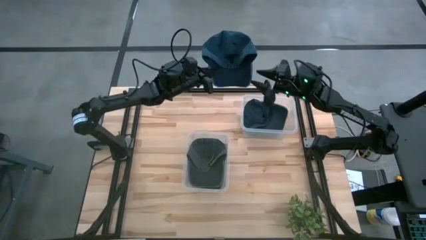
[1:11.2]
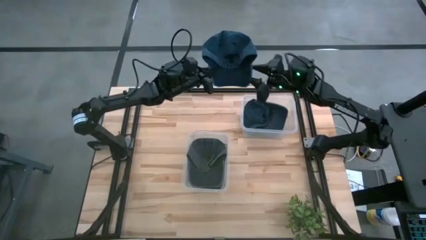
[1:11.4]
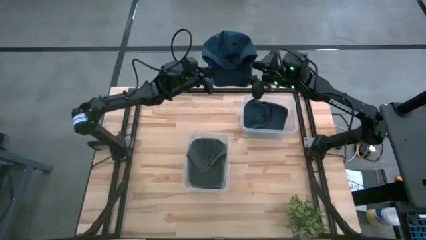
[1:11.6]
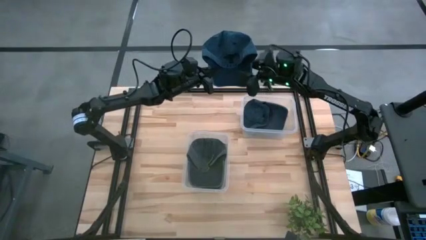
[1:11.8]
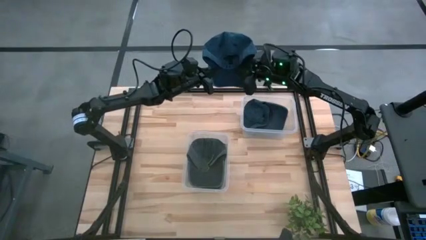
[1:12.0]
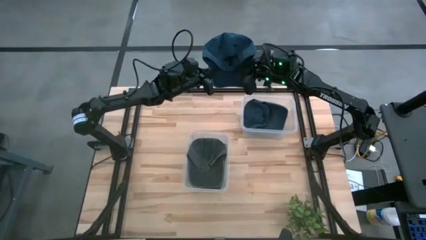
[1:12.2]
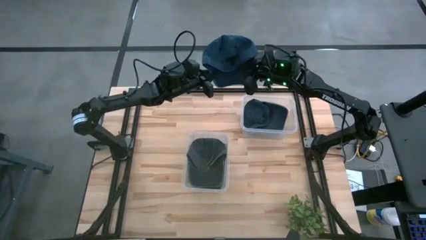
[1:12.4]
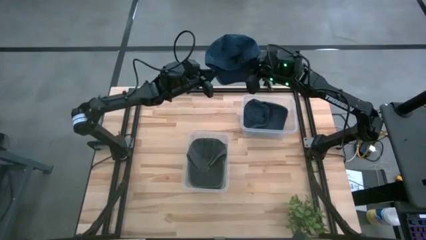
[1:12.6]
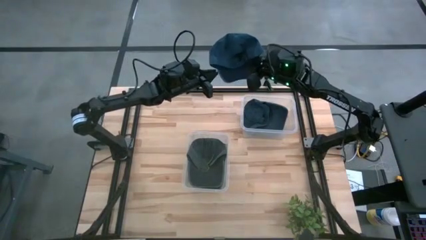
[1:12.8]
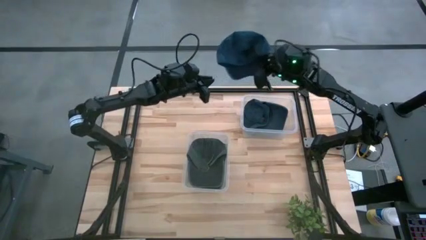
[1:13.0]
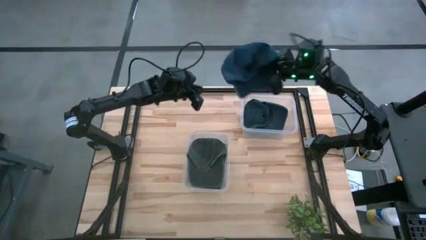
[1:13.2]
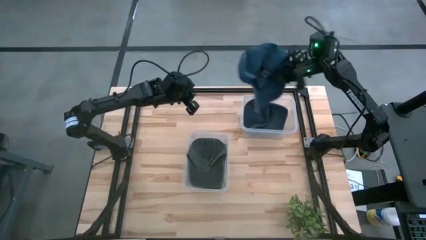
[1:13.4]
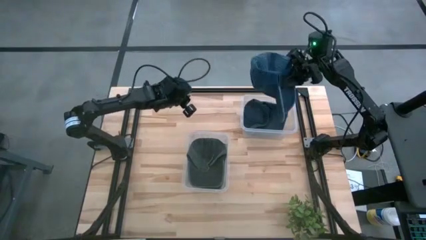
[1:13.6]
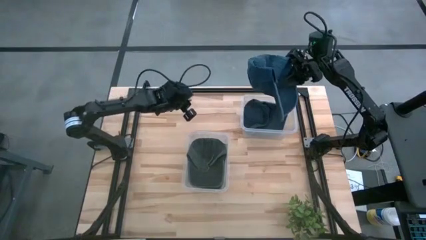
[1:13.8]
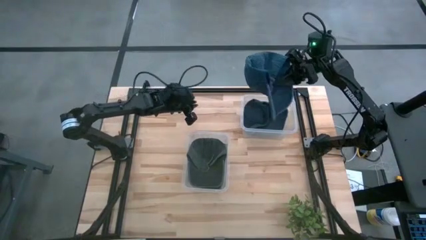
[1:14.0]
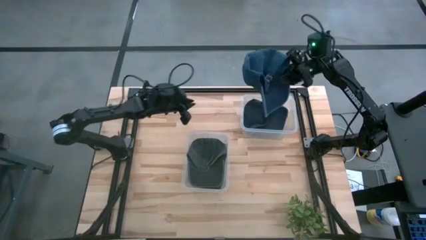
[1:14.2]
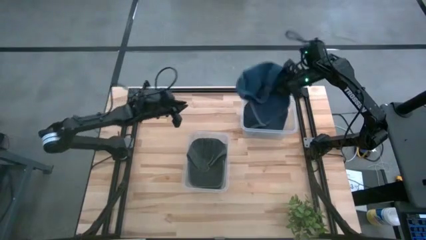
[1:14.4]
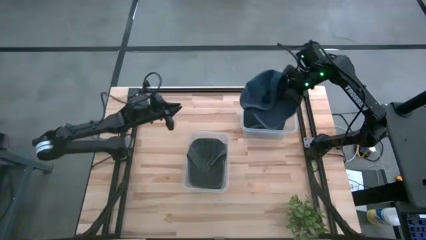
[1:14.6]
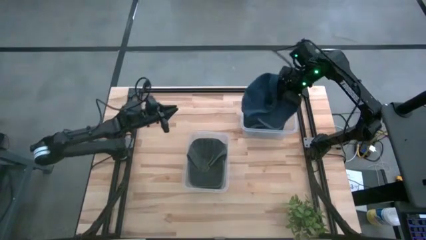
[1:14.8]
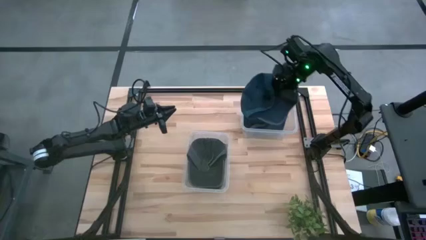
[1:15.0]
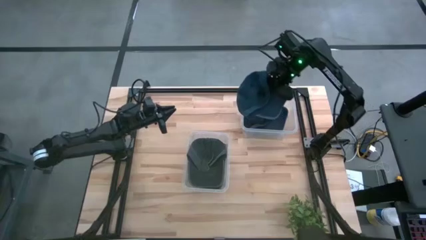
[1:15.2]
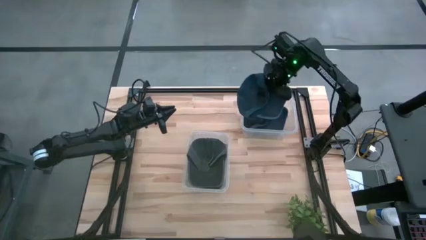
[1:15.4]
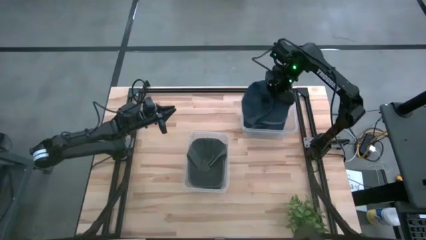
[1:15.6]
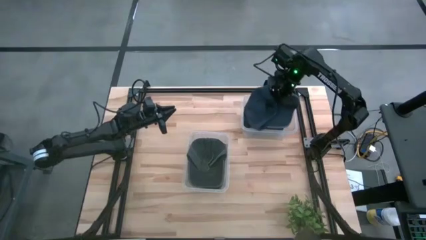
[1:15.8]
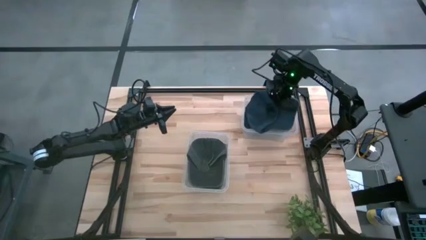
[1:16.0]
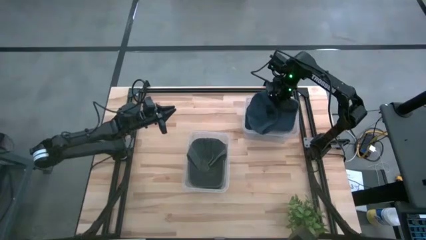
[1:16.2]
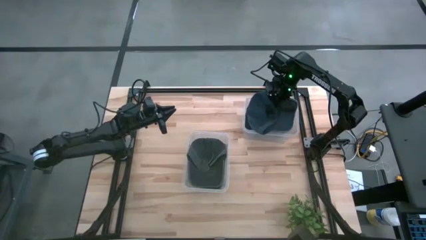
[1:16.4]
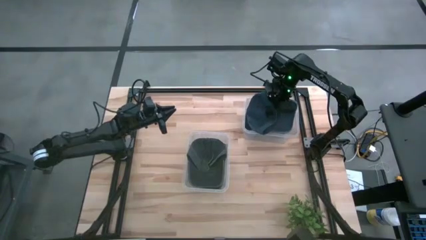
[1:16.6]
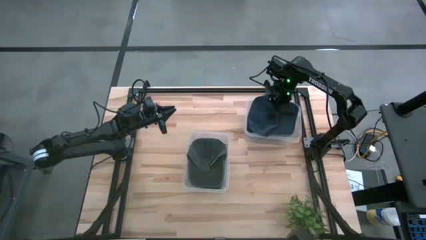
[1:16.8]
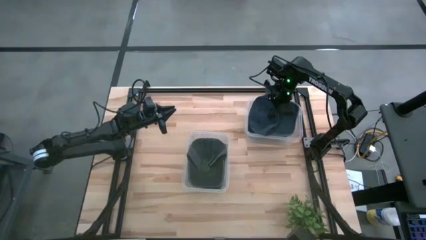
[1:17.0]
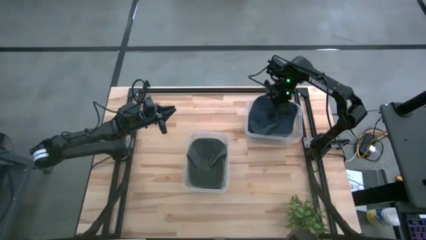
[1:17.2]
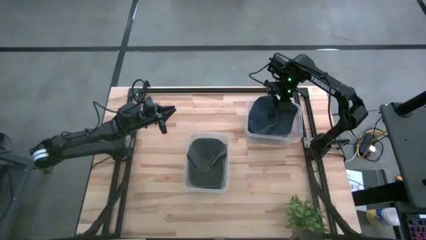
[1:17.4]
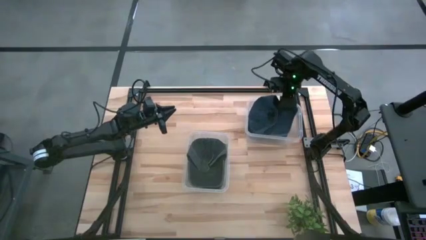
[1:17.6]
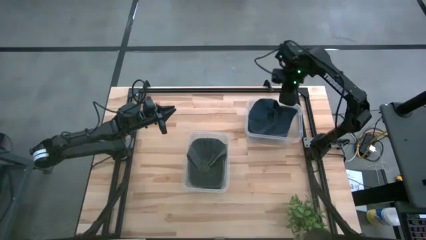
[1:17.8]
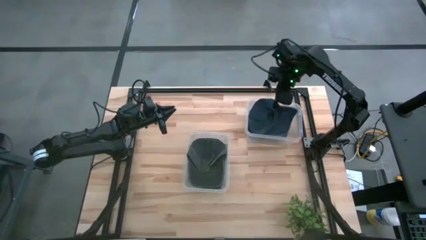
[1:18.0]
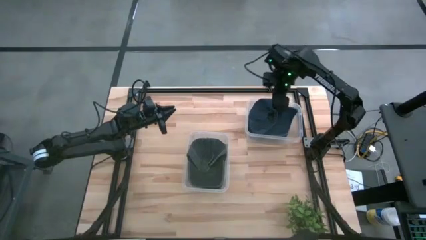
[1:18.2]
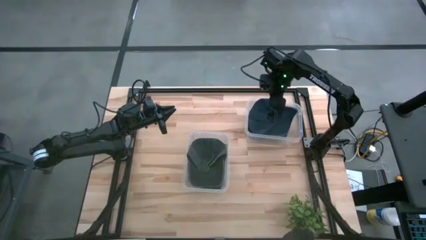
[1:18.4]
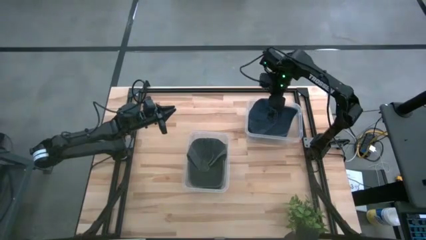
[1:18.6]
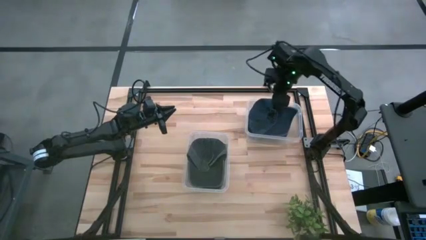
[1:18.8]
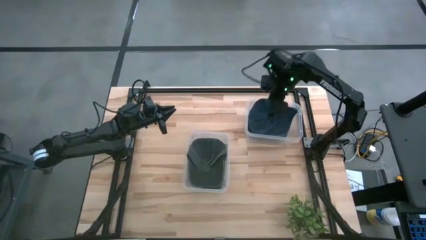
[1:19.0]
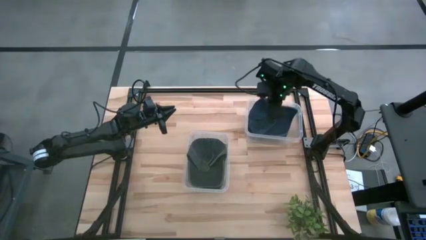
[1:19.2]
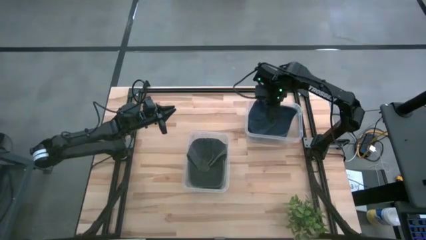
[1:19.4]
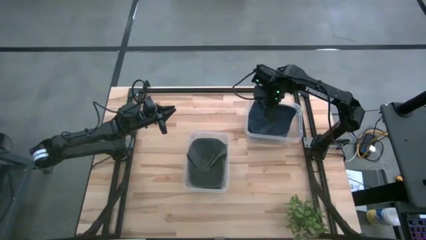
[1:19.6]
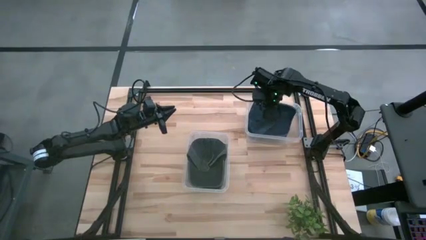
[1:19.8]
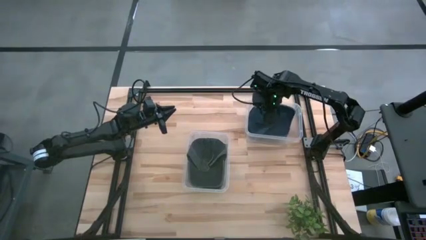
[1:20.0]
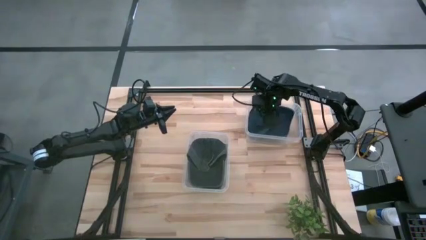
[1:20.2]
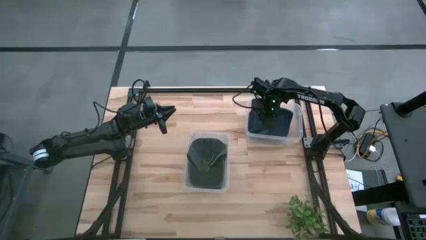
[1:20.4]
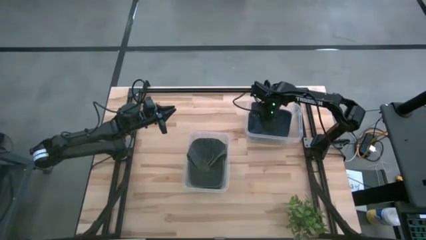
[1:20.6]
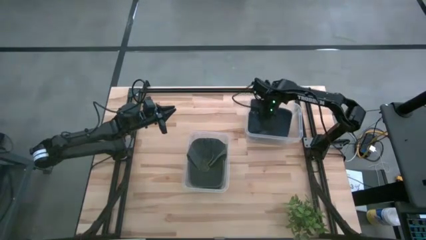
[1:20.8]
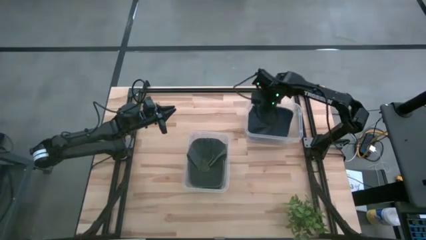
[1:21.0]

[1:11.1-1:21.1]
Task: Pick & Place hat
Put the blue cap into the top transparent bin

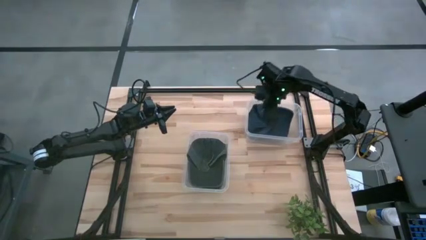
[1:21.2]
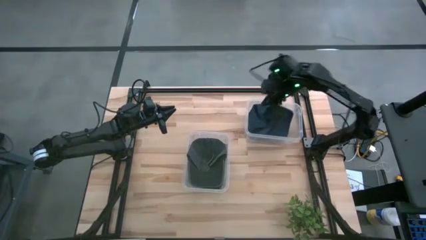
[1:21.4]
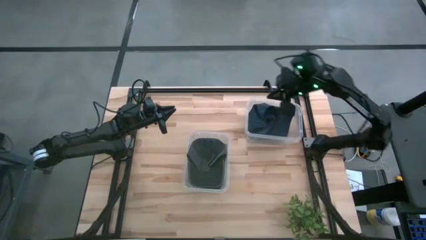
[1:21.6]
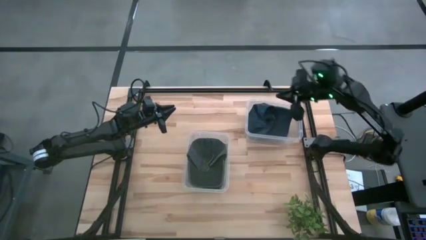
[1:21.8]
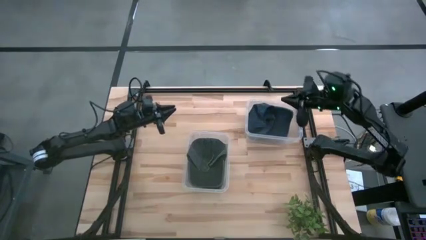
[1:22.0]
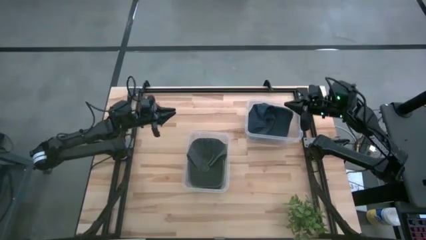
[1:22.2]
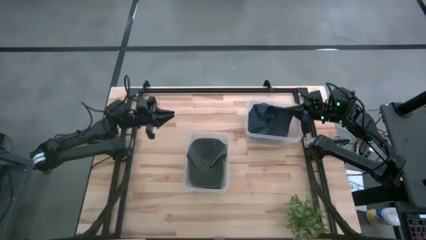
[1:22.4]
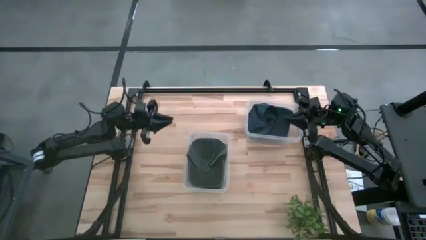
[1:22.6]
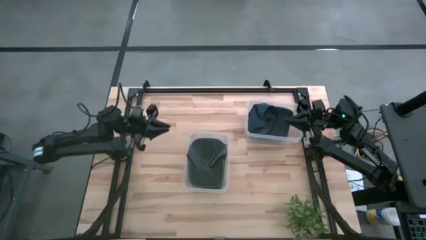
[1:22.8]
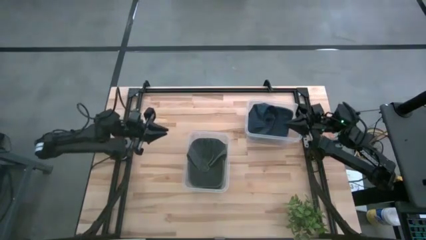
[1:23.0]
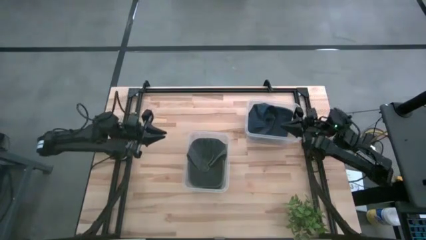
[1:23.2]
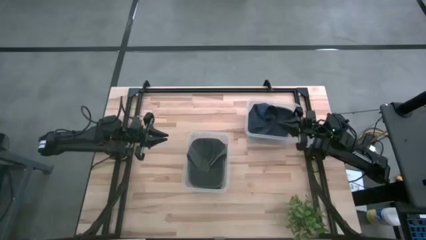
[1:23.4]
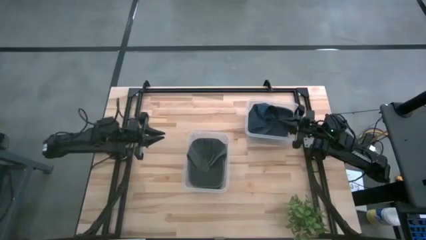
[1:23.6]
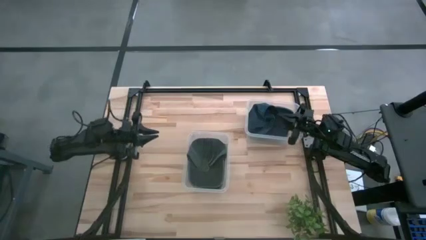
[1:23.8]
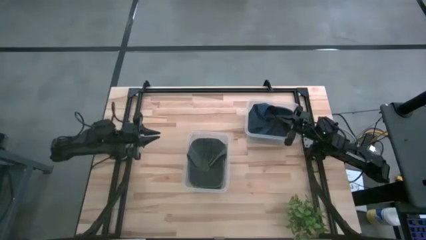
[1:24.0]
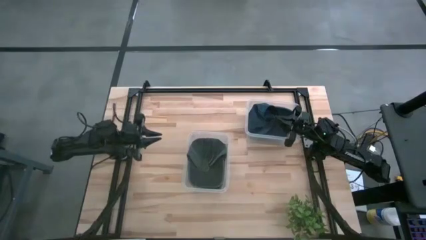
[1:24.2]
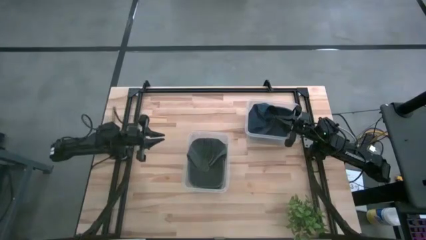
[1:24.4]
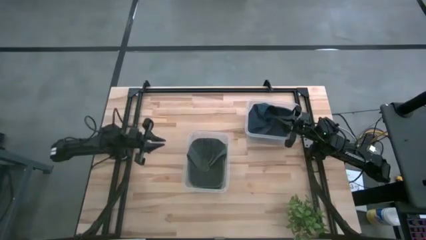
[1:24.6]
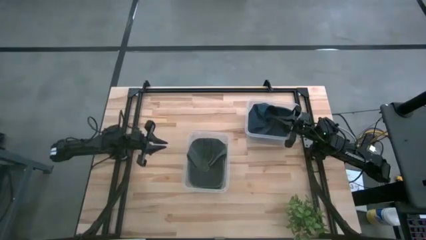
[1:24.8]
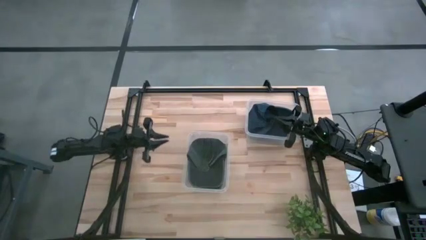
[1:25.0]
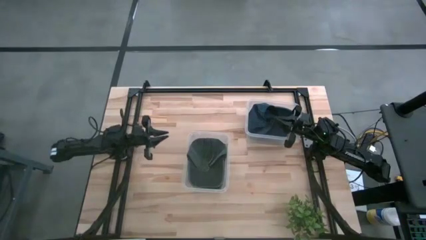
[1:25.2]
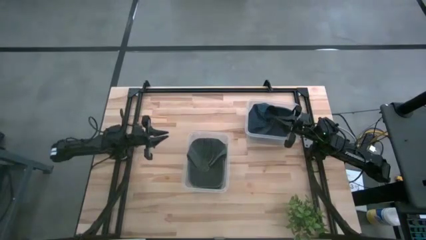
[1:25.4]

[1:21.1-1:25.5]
Return to Home Position

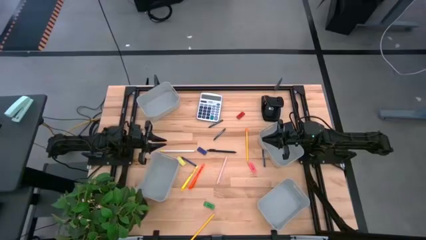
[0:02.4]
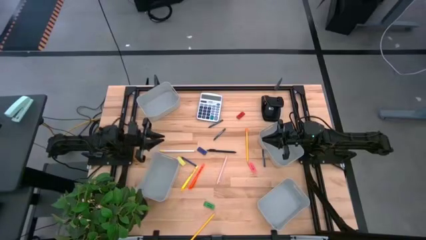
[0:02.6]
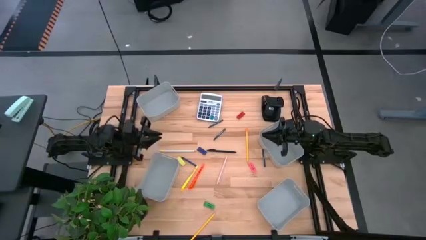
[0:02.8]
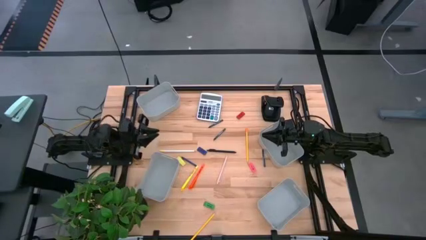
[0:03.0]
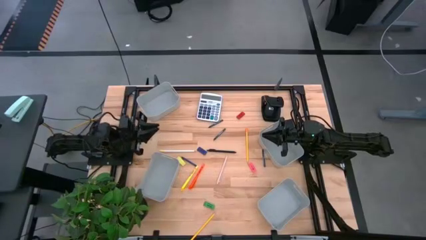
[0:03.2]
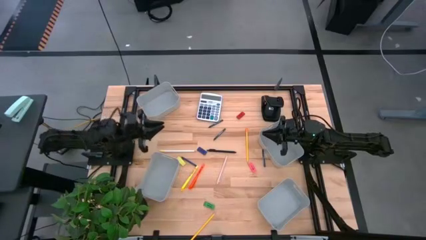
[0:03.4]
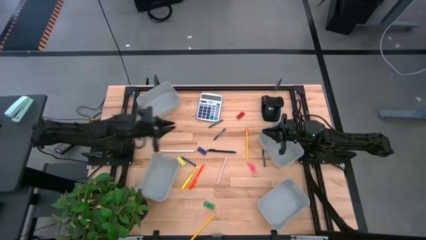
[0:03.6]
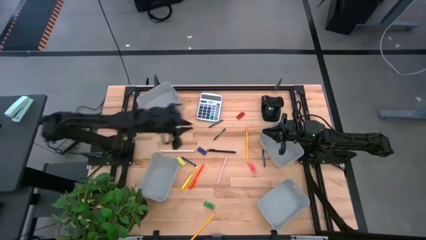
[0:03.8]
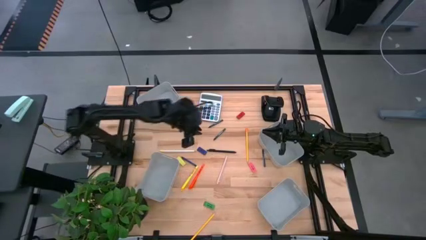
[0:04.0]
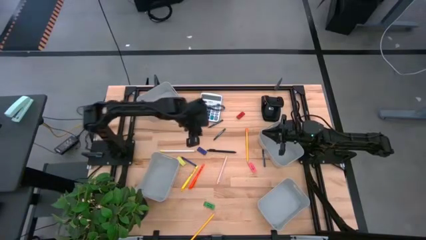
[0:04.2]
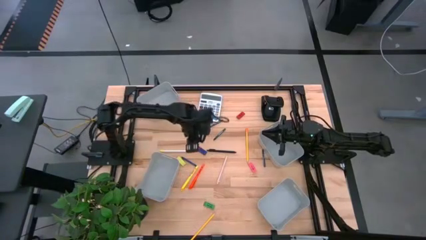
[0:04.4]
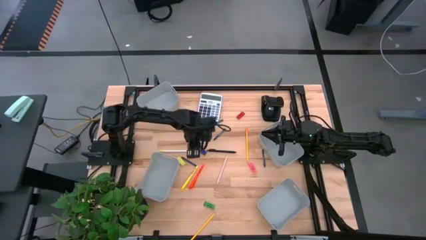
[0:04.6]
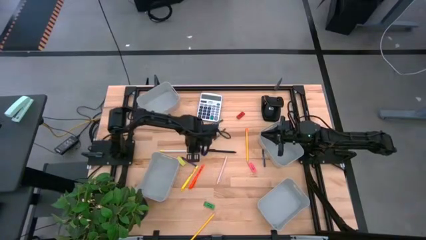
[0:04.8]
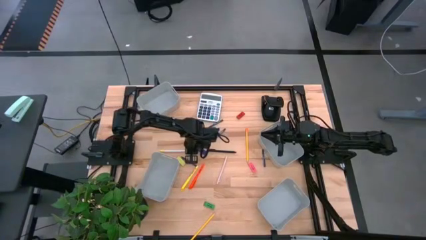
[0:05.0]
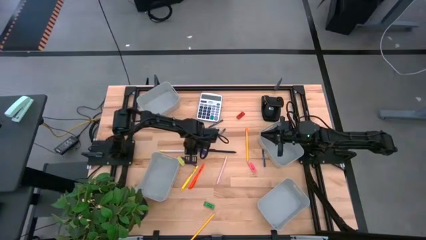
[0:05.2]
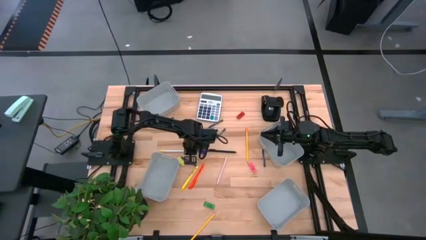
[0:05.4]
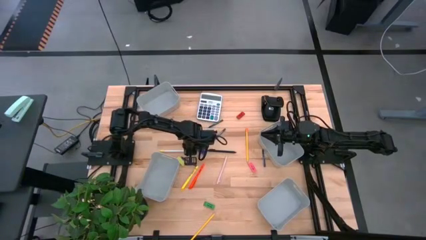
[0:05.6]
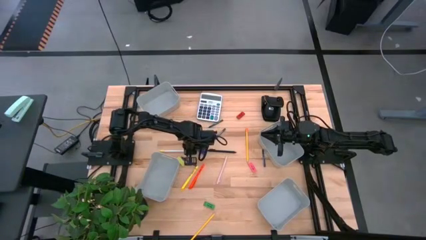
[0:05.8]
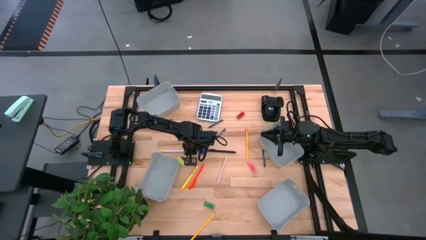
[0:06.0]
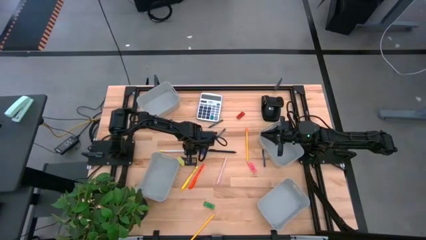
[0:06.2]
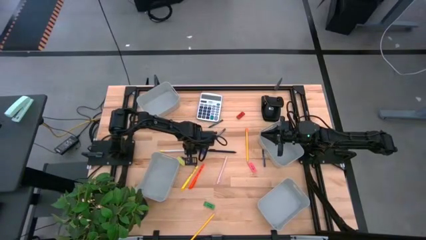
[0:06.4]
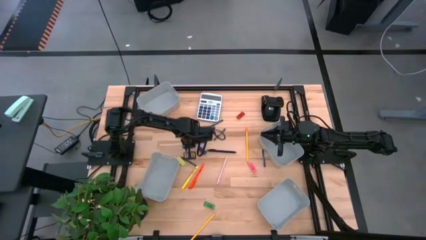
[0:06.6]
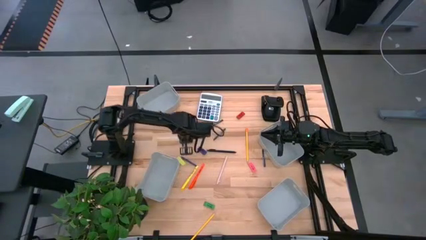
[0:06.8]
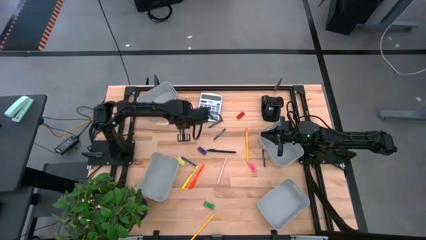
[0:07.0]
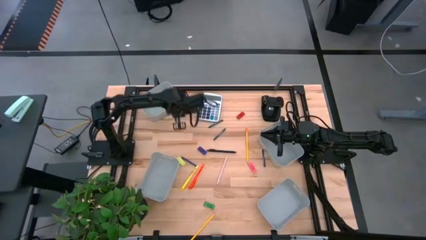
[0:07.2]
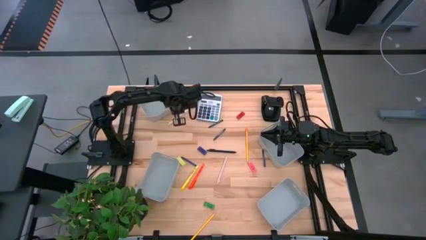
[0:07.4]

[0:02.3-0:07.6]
Task: Sort crayons/erasers/pens/pencils in bins
Put the white pencil into the top left gray bin
